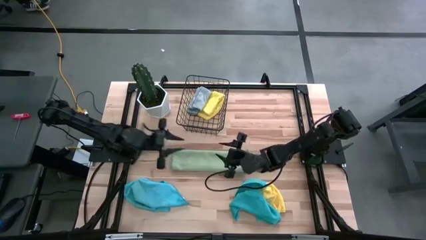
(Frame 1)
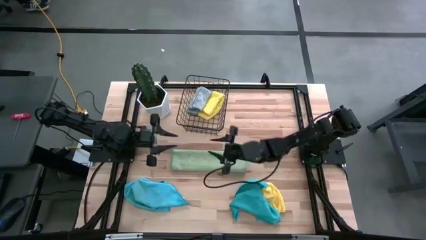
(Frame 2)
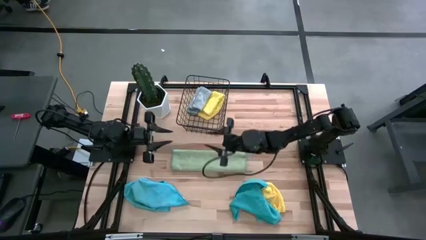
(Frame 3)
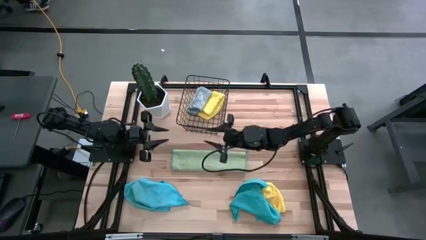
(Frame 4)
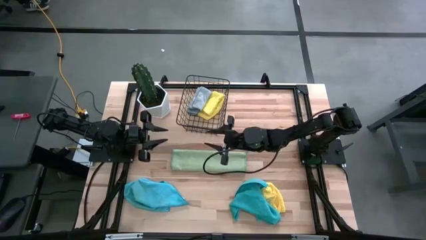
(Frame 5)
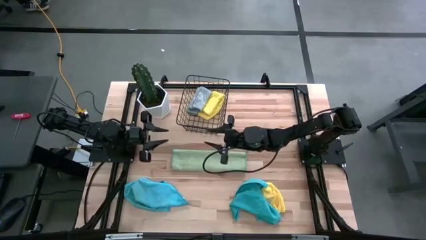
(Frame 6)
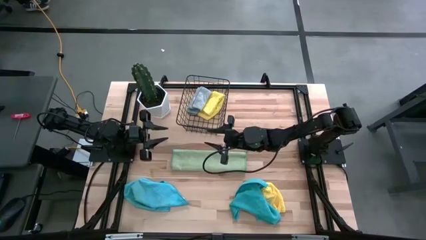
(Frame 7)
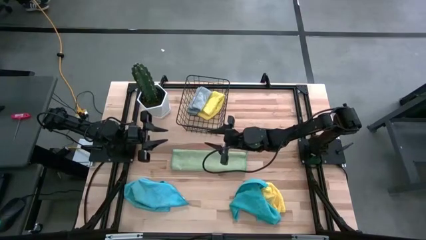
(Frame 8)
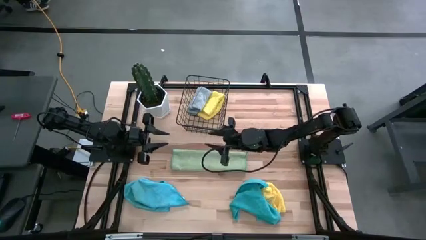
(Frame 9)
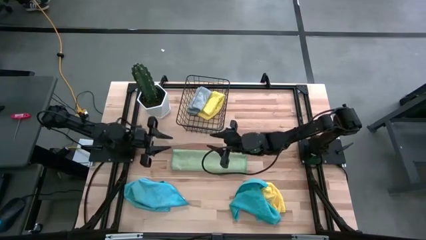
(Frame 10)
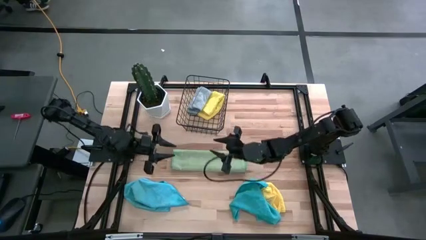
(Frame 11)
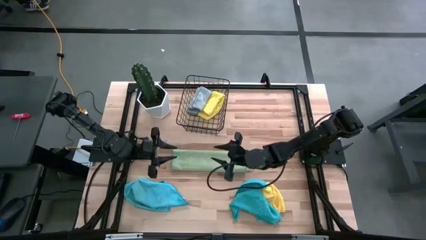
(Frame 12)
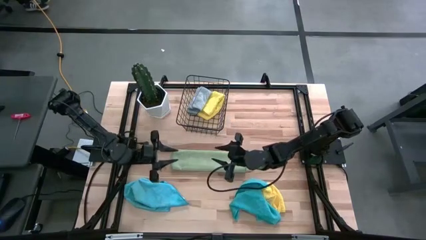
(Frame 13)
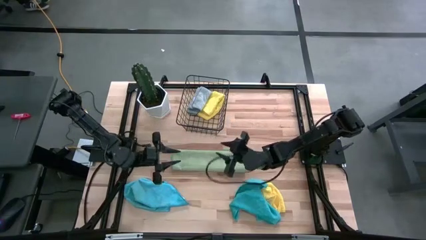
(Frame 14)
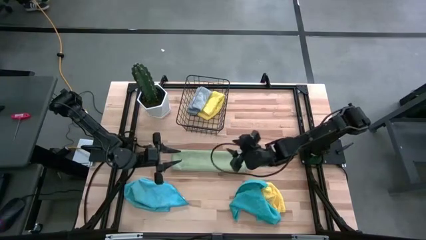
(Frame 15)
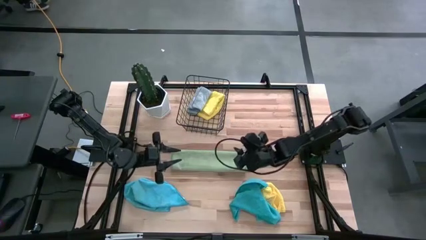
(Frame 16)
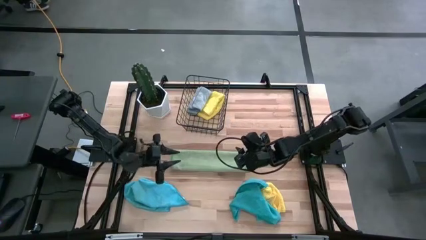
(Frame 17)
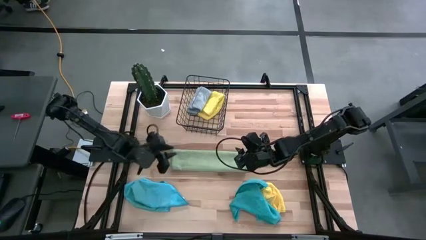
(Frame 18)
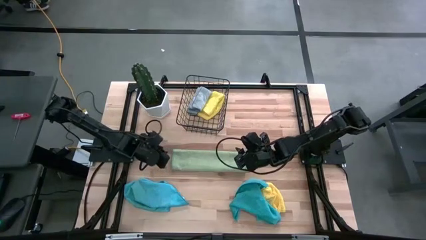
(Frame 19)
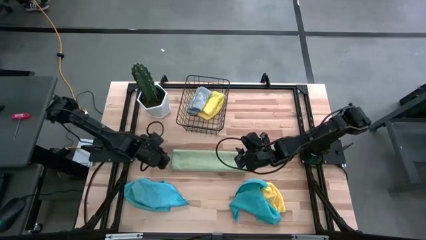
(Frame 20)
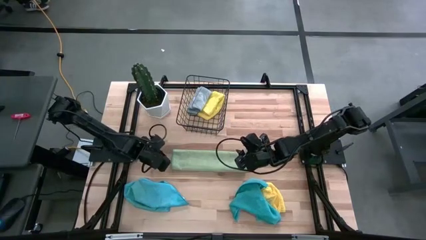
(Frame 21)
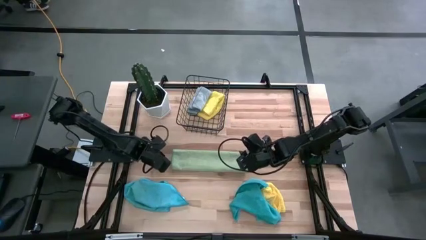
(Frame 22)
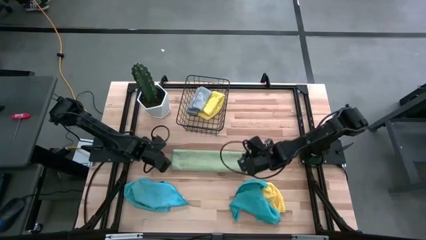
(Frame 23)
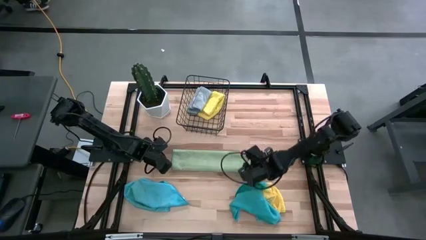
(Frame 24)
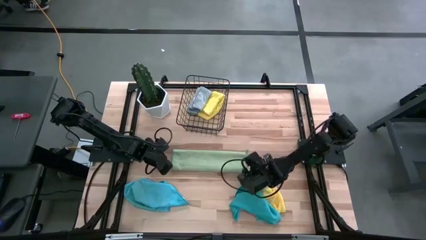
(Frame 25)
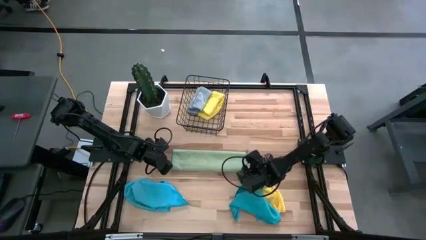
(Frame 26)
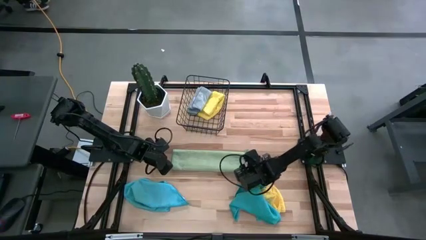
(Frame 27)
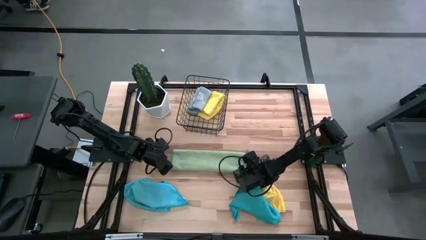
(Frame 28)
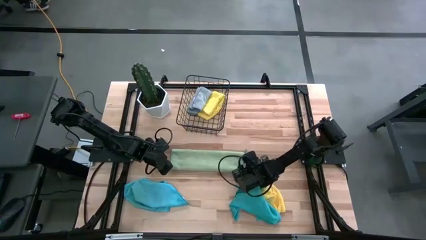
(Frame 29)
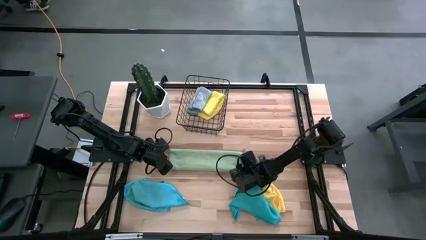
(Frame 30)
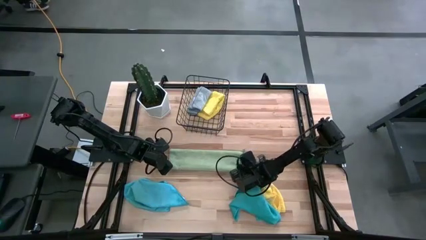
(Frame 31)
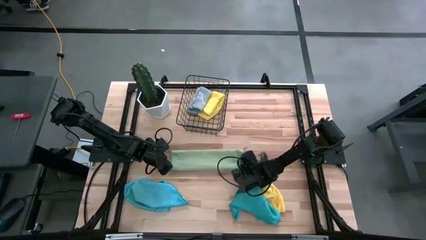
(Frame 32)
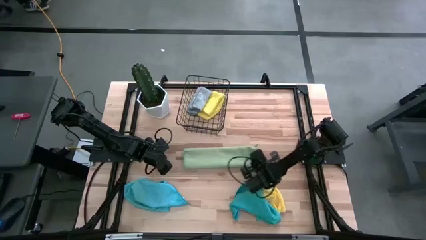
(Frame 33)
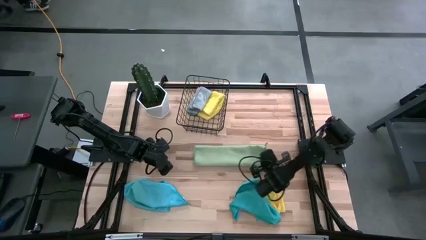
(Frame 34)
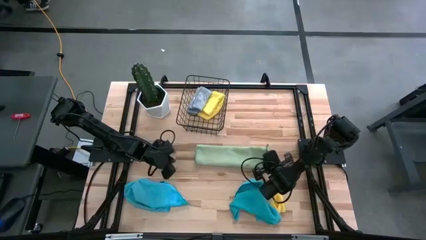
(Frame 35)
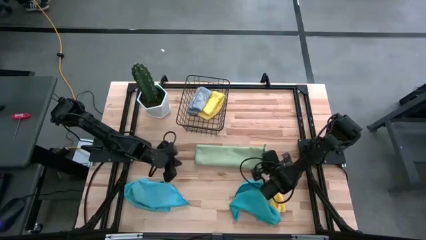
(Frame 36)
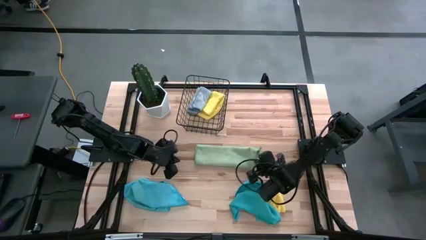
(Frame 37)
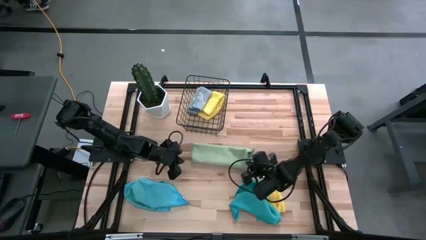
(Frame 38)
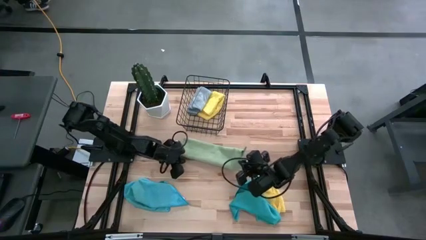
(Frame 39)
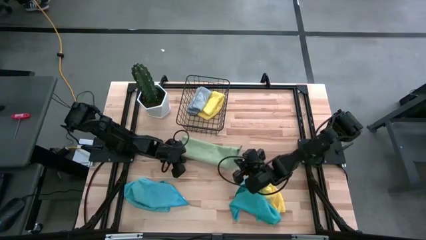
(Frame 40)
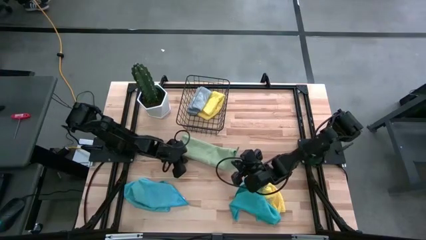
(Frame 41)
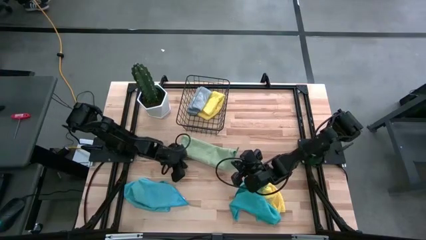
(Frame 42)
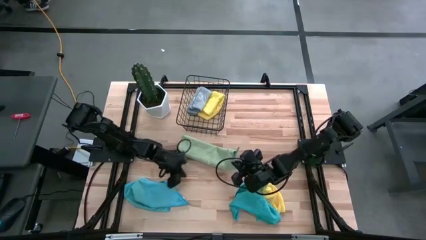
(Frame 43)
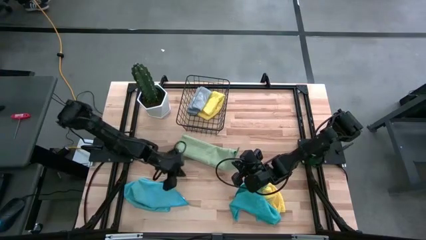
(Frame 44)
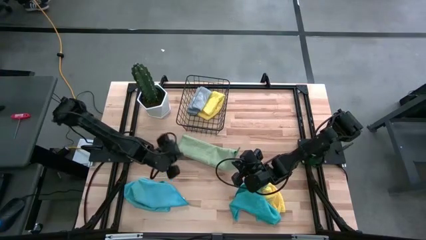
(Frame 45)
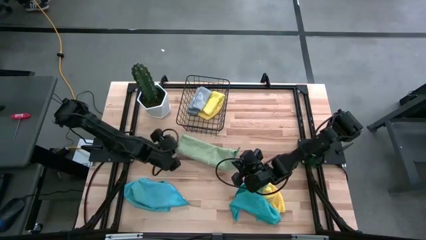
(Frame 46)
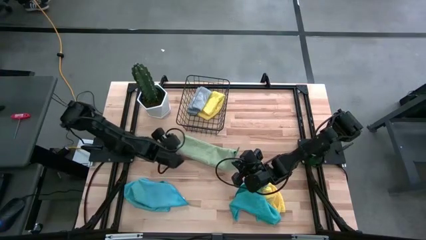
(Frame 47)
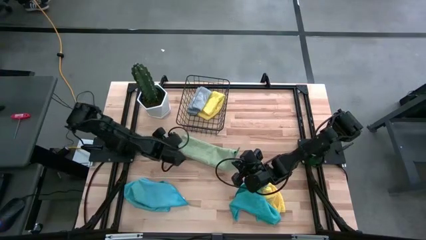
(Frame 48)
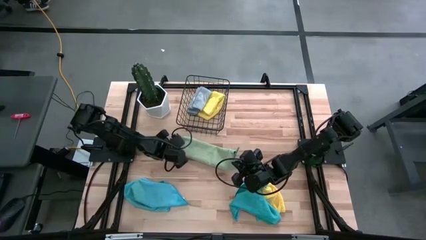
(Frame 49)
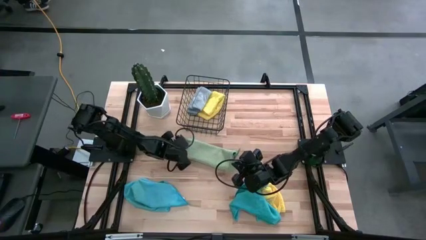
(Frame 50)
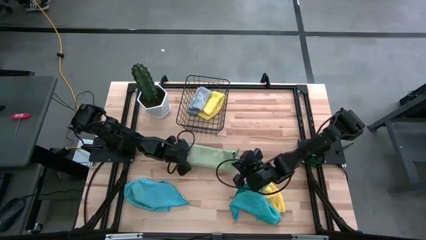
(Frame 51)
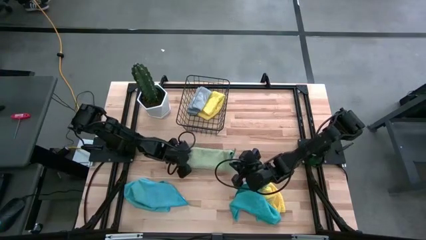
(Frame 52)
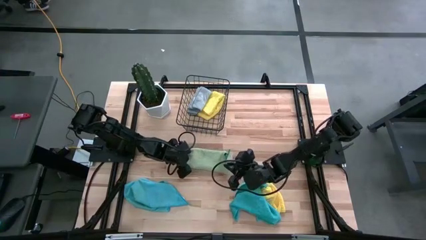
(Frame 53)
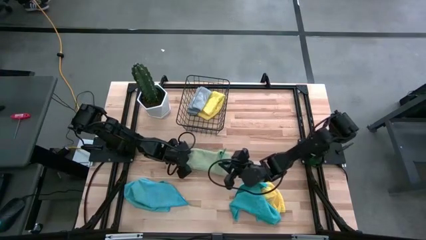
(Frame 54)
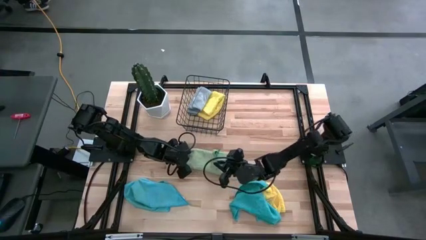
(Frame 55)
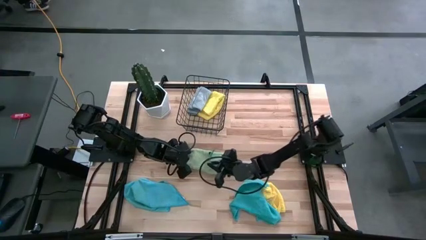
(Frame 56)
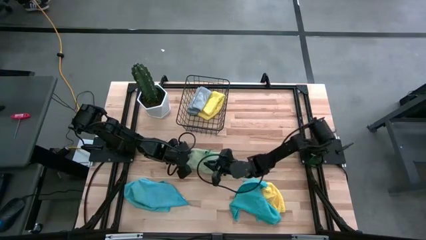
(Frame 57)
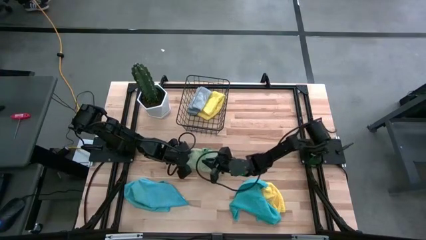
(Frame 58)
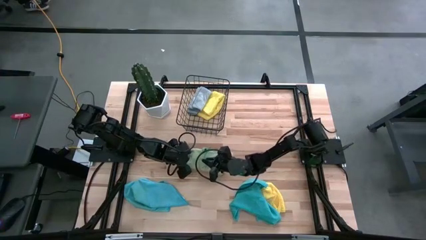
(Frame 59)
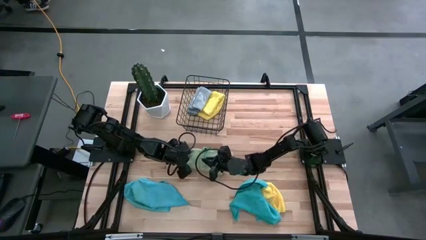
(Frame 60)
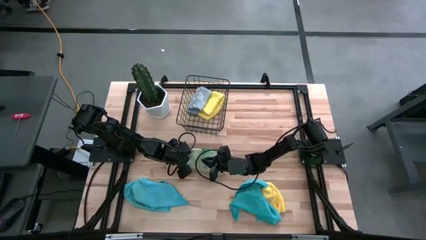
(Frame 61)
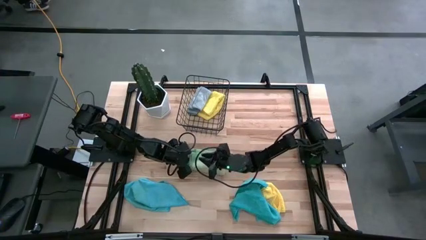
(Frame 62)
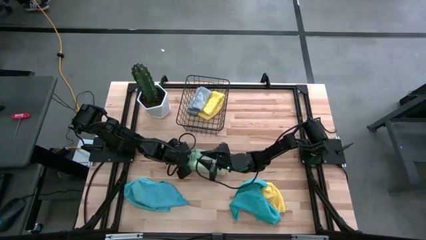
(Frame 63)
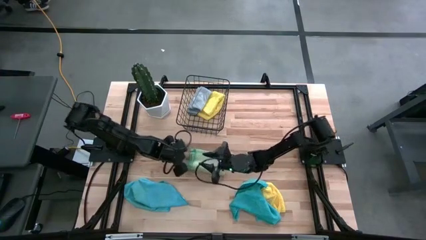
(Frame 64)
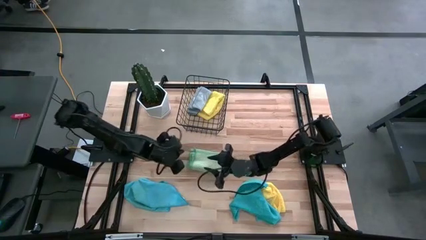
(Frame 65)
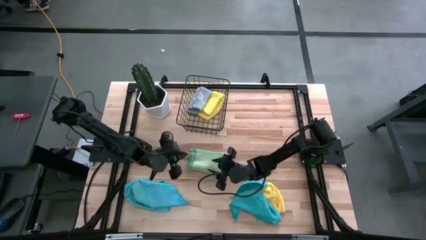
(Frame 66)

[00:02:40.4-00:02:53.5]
Task: Fold microfiber towels
Fold the green microfiber cloth

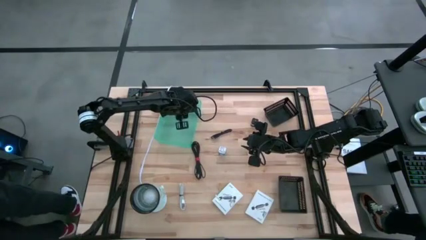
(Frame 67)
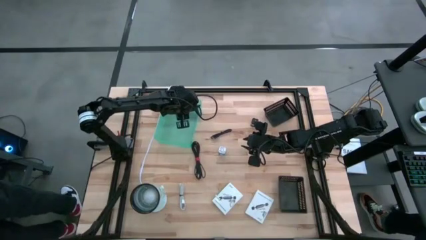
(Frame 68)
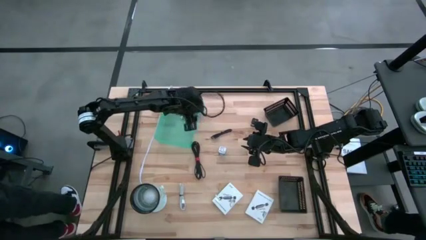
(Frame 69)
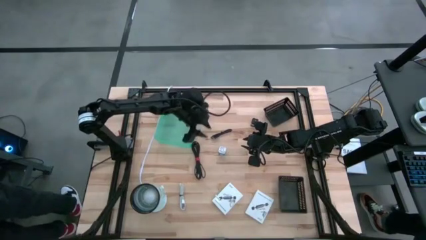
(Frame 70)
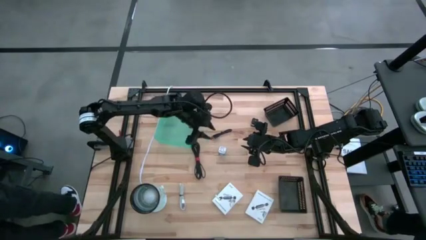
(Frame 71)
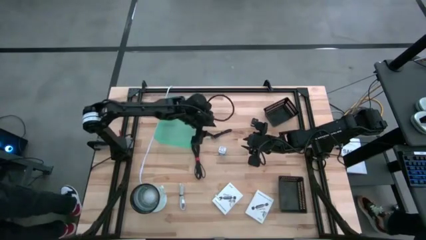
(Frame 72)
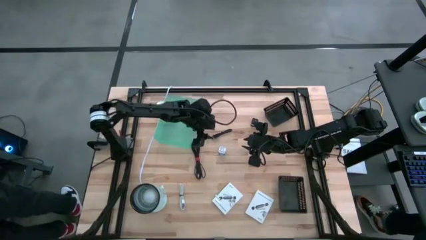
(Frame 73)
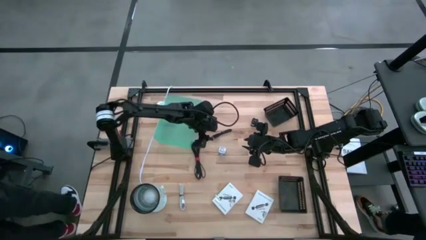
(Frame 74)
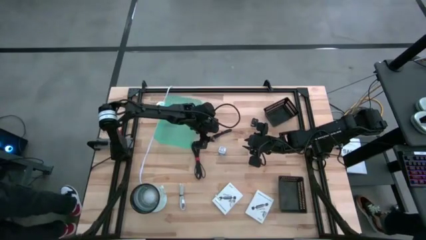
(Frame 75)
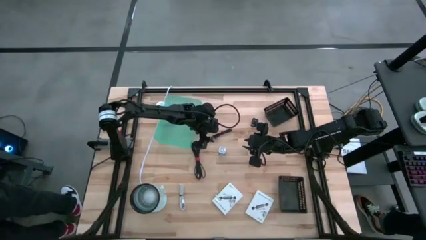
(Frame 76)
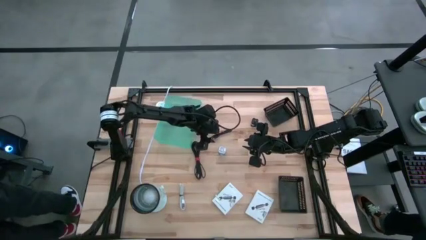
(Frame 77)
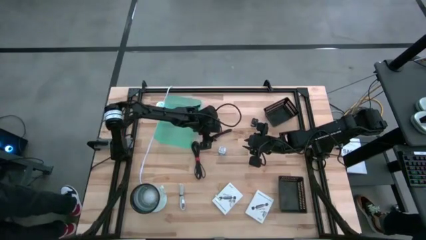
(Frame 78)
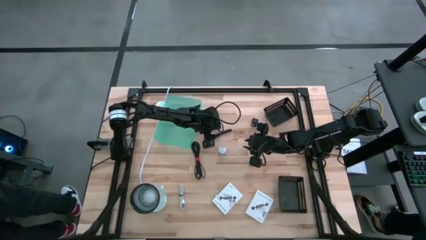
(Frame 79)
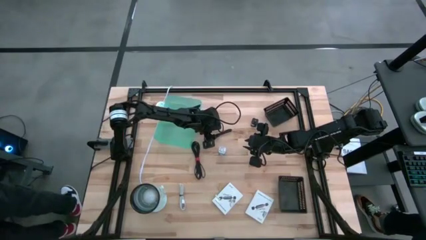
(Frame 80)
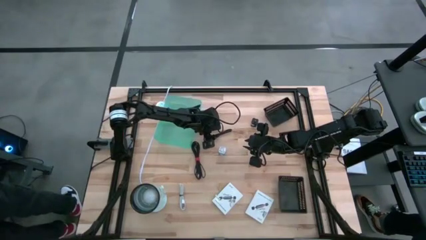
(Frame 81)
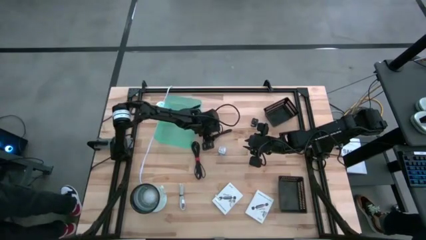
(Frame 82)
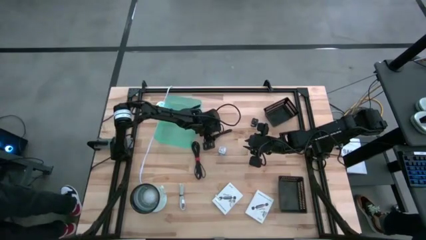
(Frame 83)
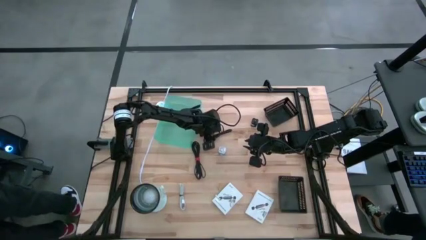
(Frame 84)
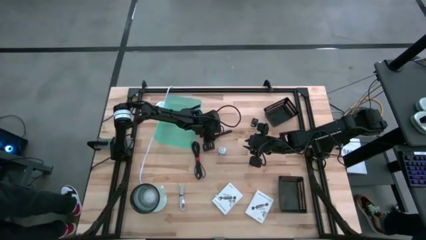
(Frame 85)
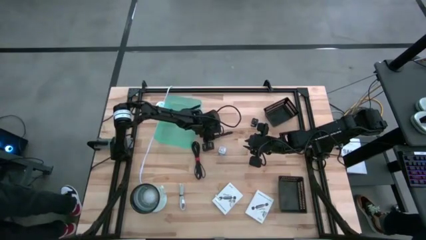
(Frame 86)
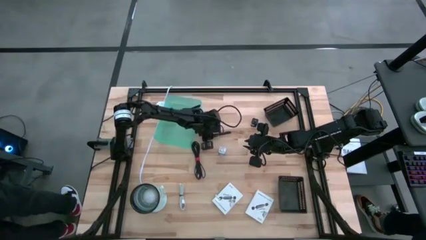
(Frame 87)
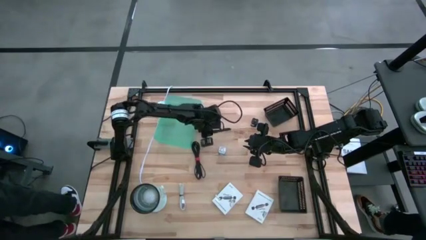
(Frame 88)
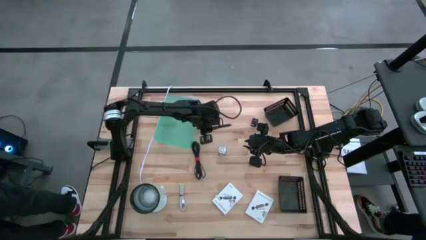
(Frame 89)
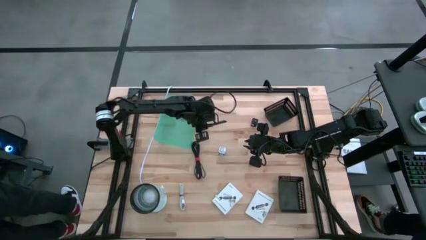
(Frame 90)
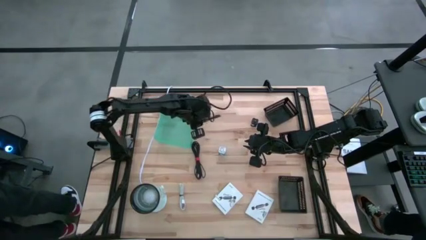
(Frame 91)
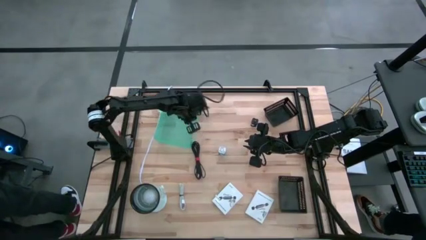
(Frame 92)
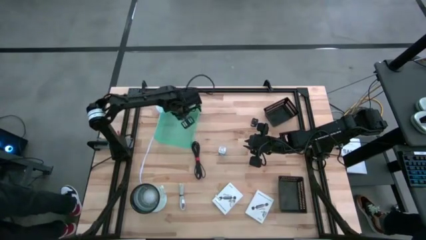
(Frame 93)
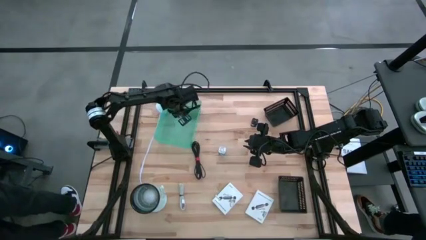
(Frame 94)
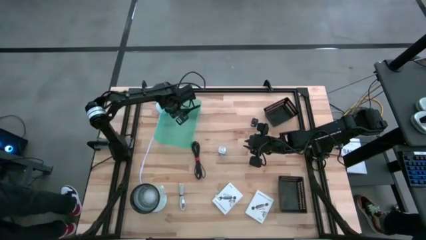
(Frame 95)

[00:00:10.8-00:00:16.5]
Task: Pick and place items into bin
Put the small black charger cable into the green bin
